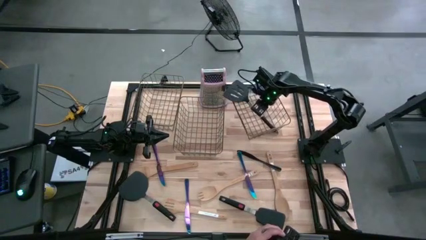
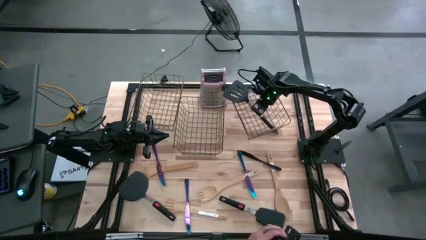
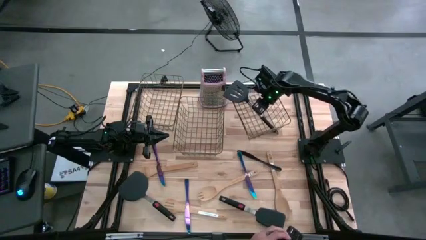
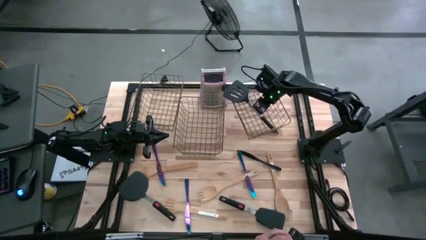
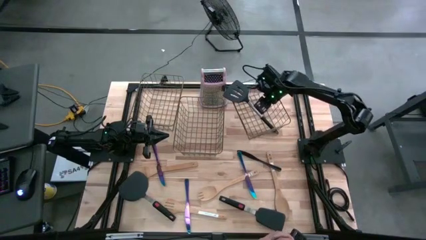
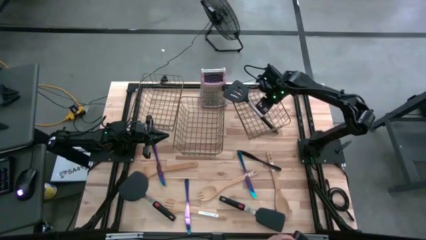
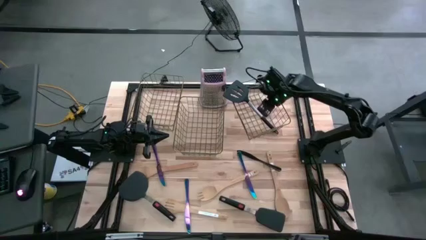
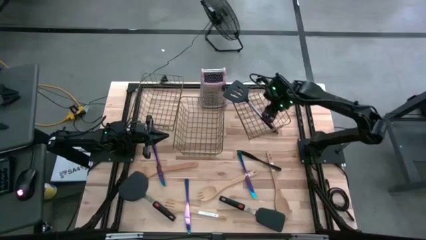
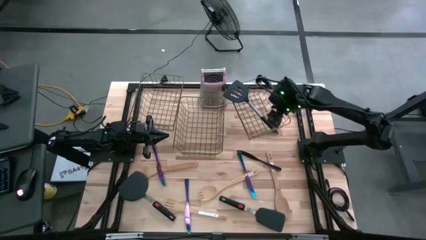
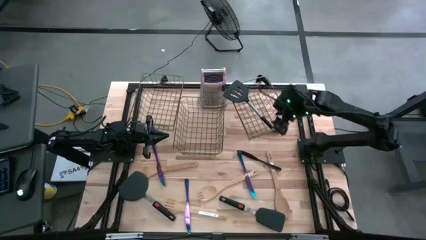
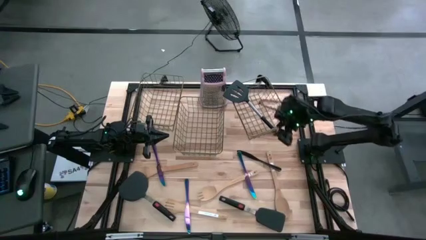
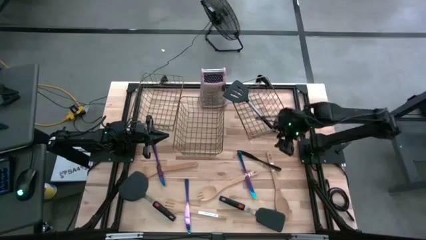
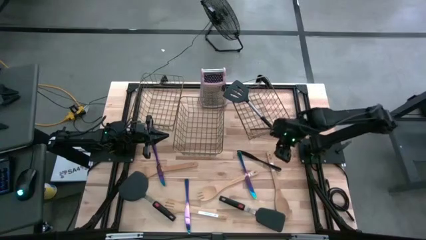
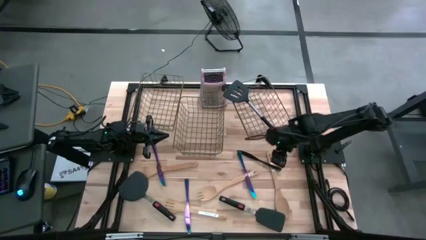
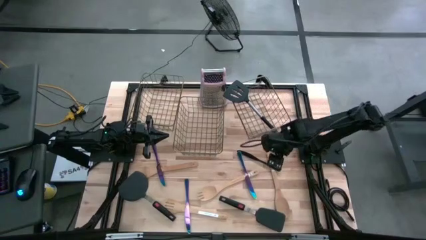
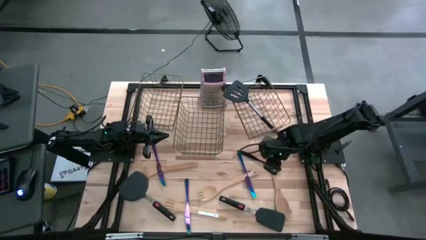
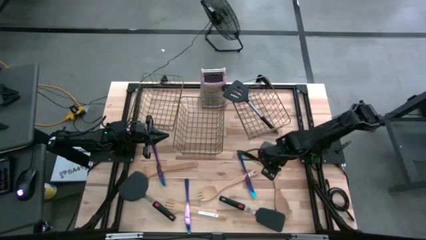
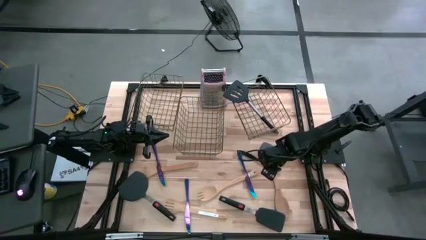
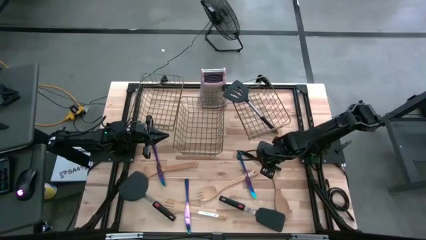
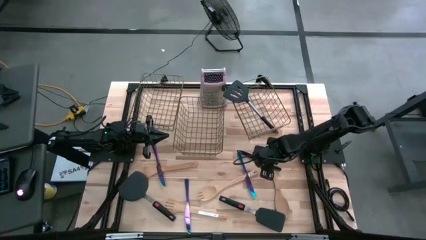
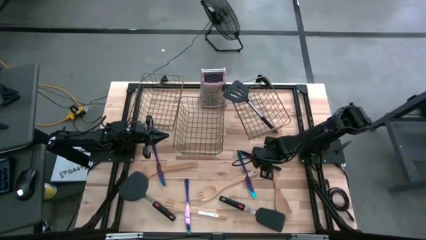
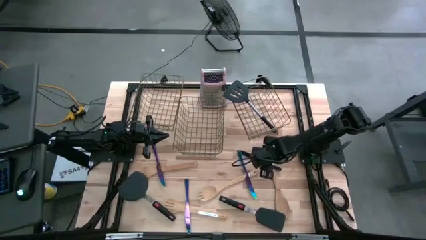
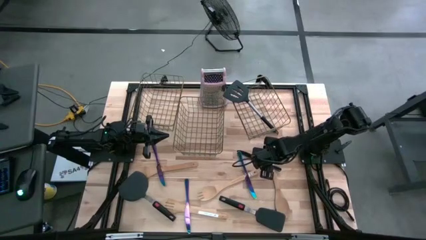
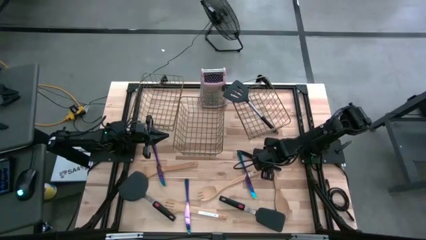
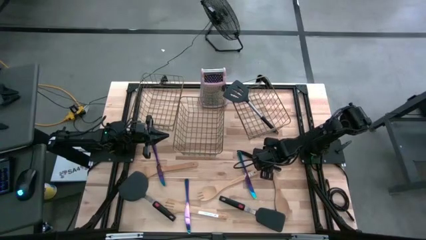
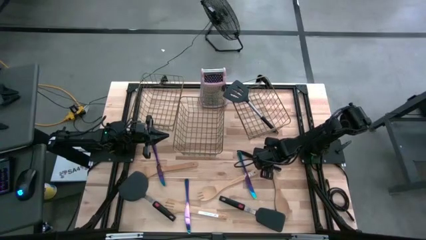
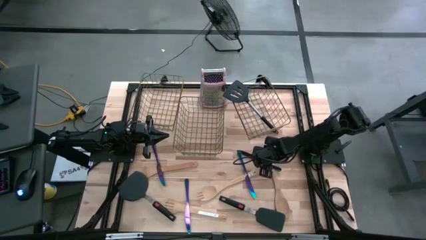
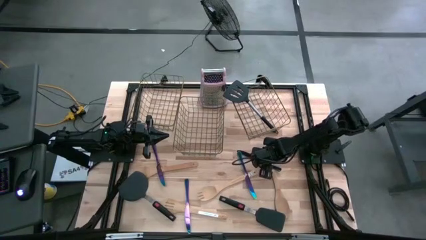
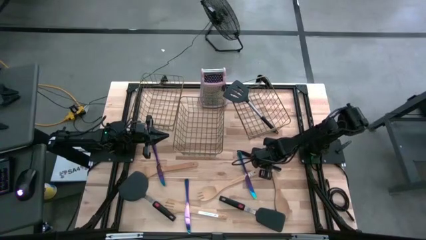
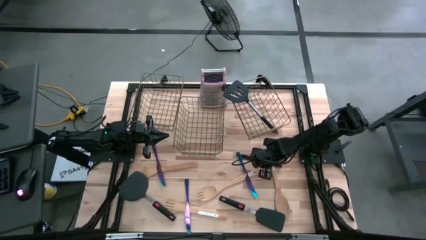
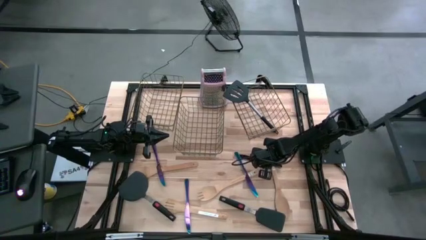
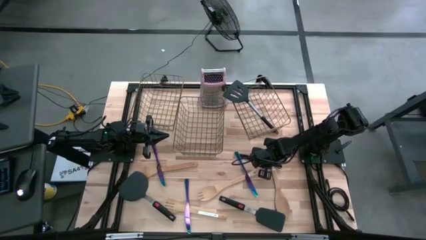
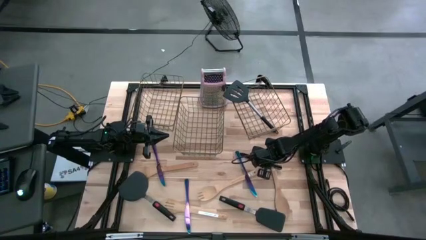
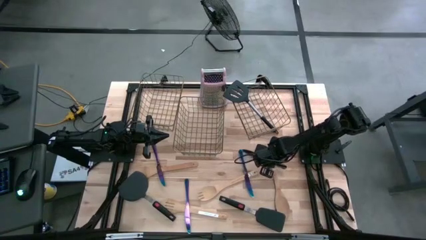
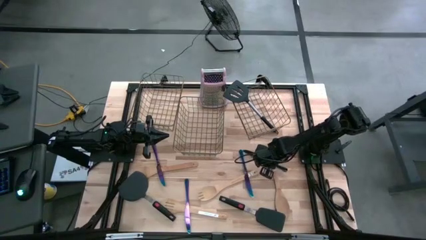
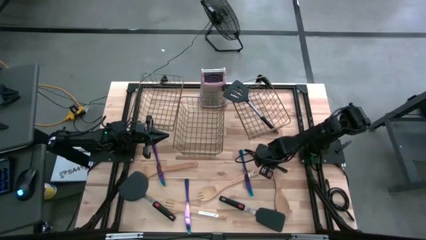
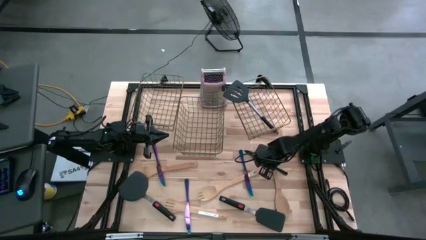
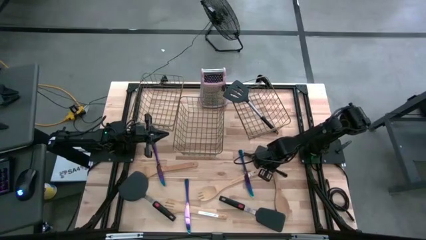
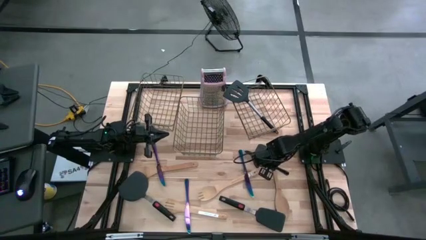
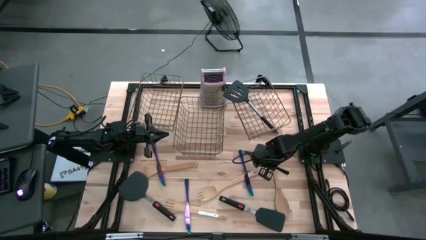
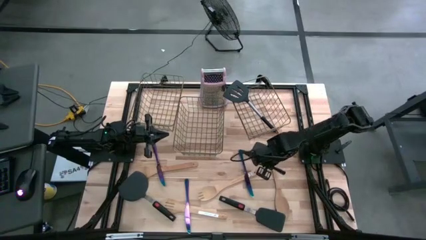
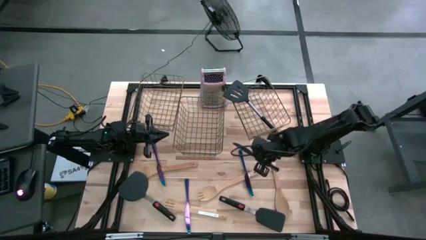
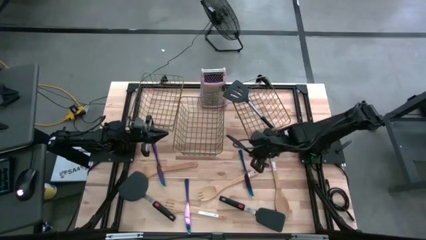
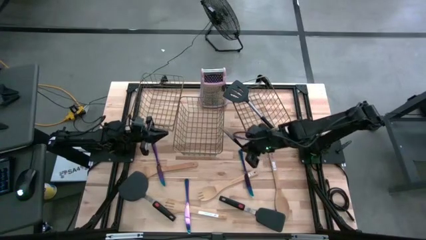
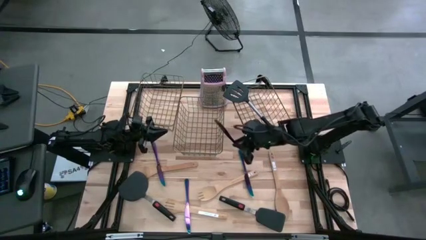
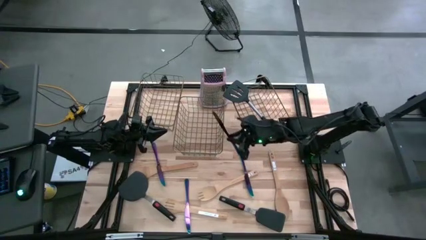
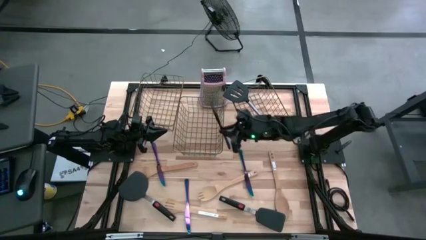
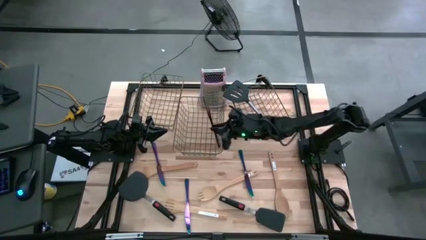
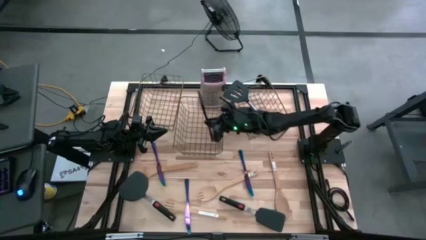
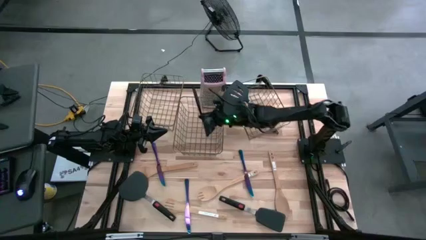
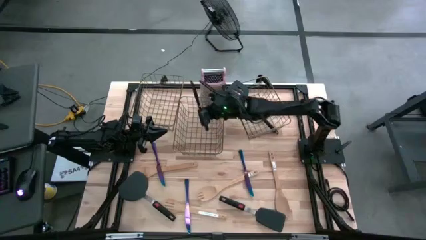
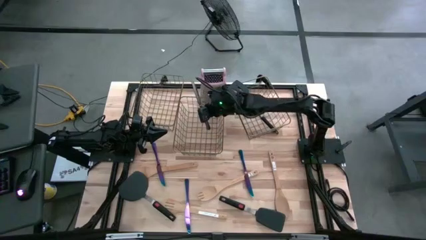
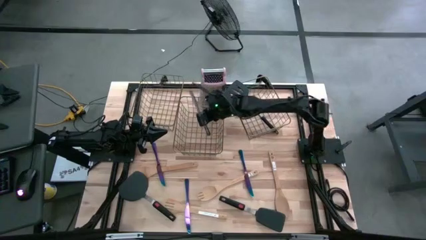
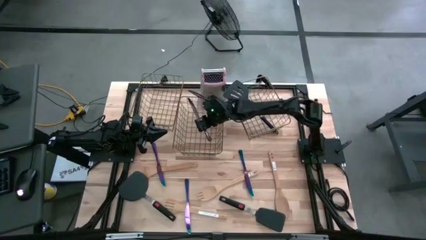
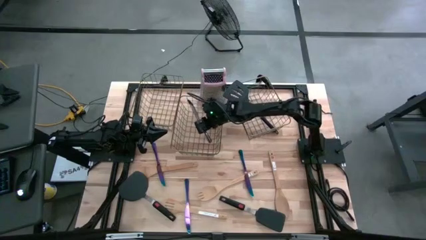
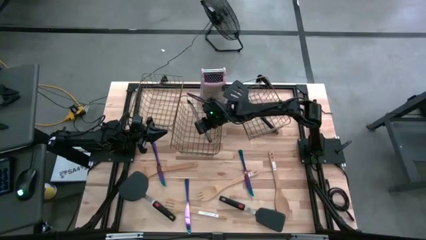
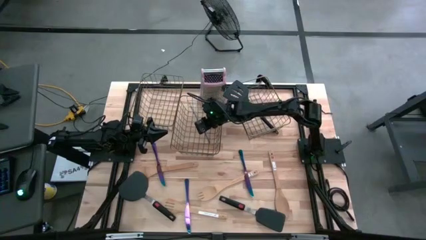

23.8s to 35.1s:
Task: Pick & Place Kitchen Items
Put the black table knife into the middle wire basket

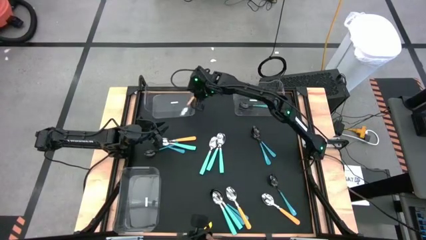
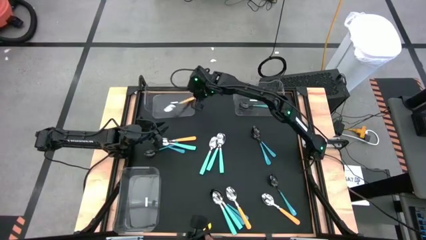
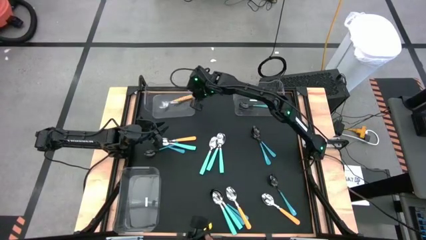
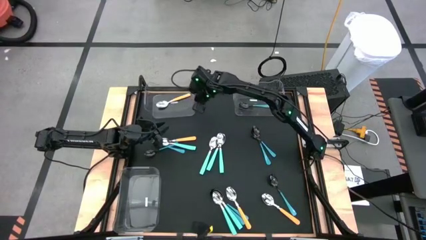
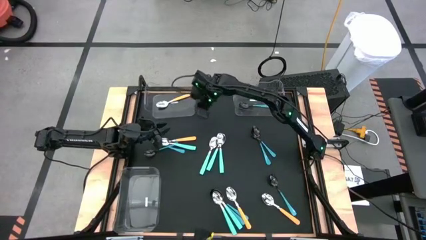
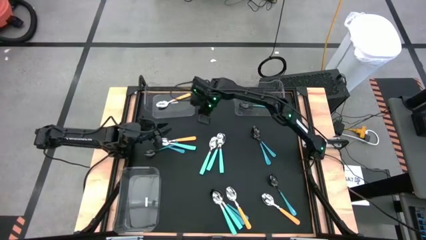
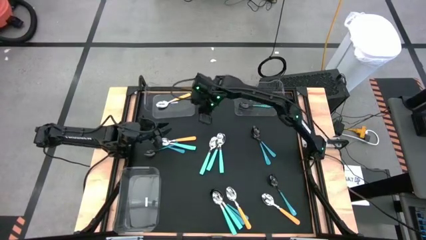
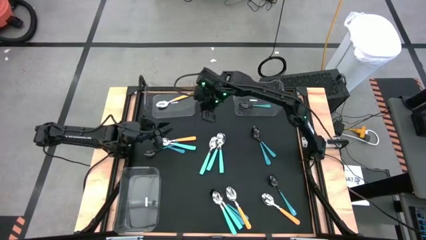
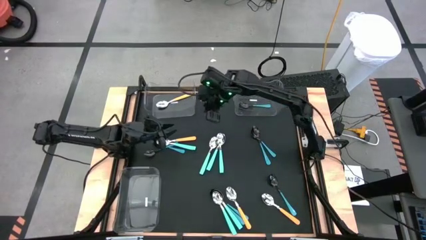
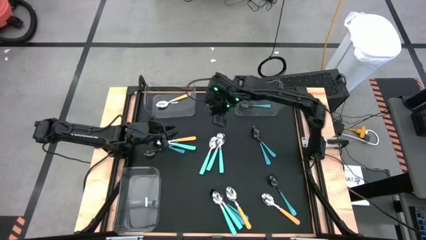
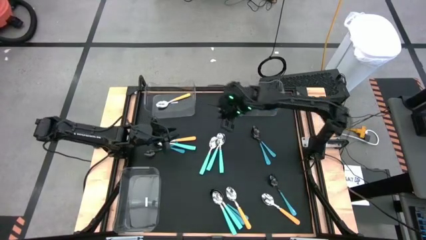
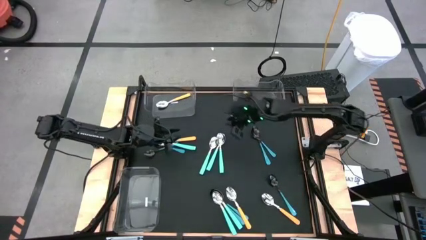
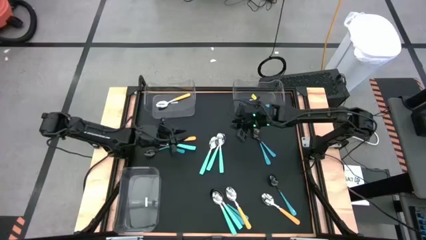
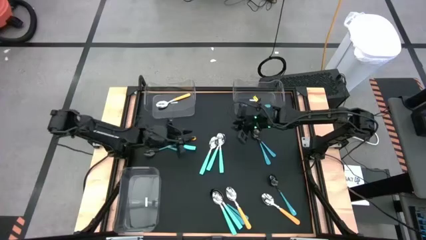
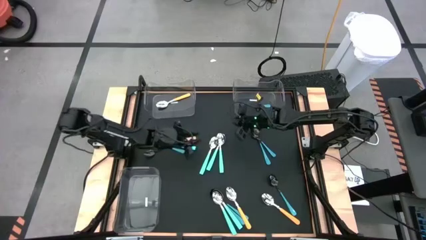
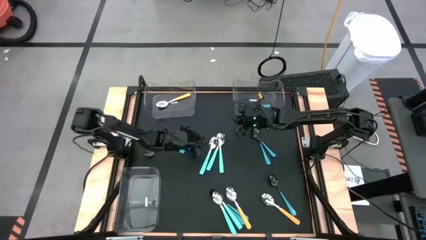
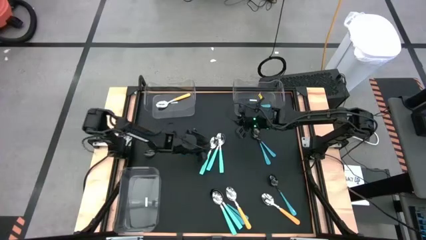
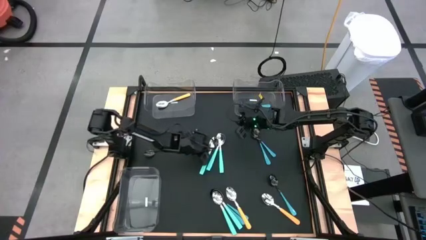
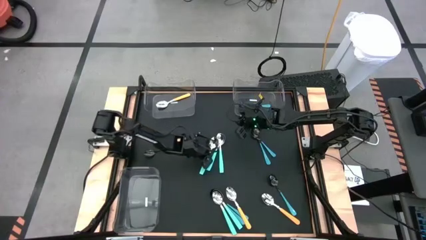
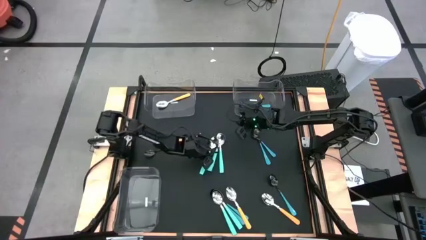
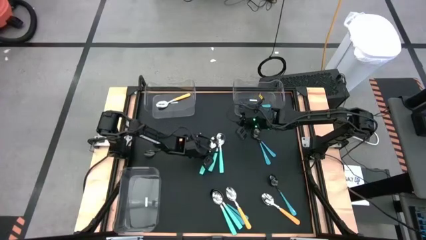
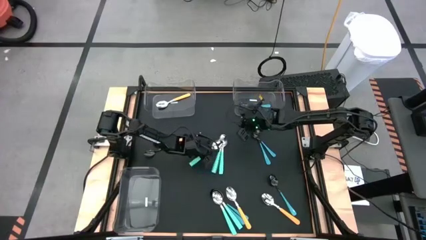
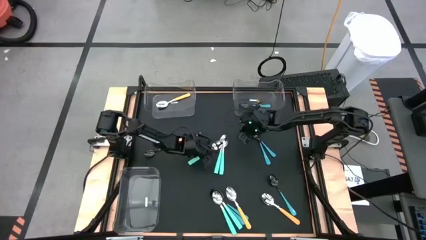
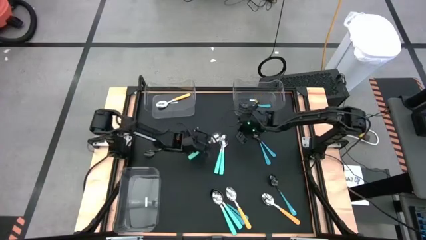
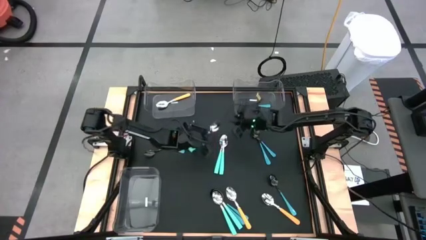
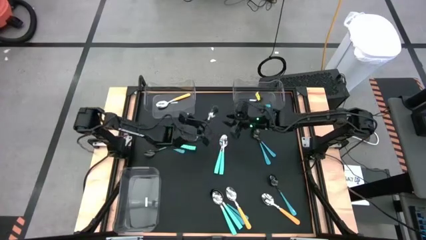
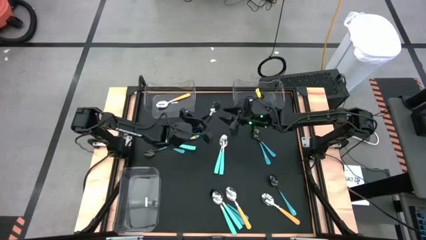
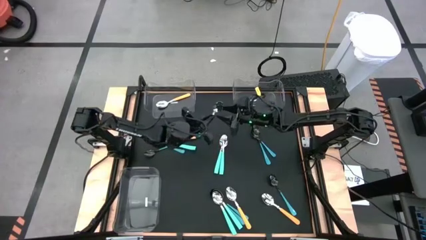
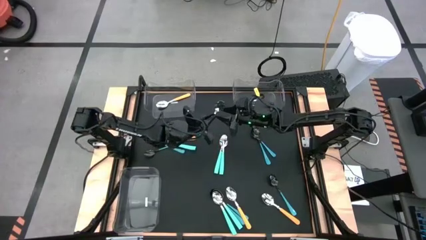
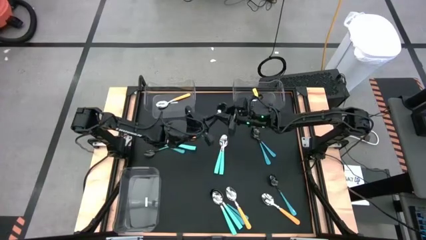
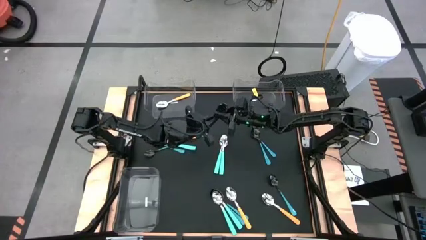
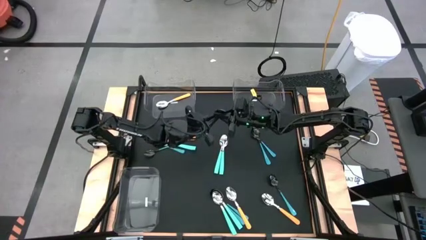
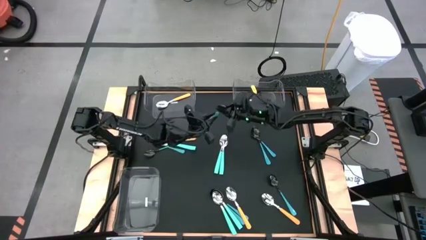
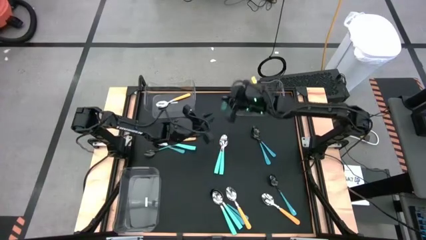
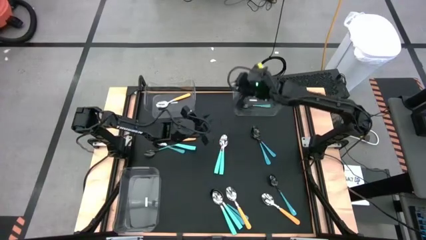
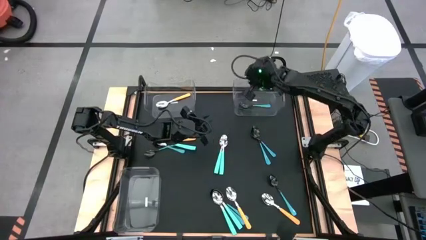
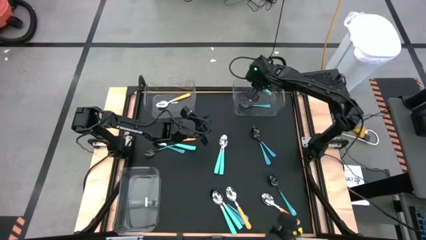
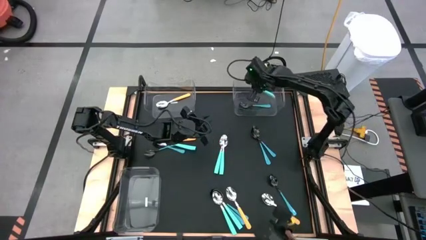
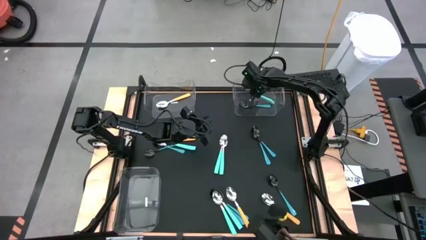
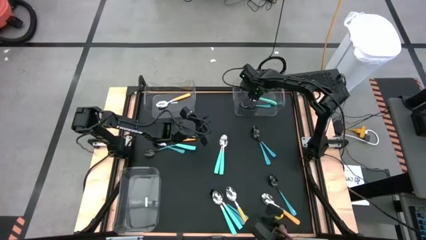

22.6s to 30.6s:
Task: Sort silverware by color (type)
Put the green spoon into the top right transparent bin
